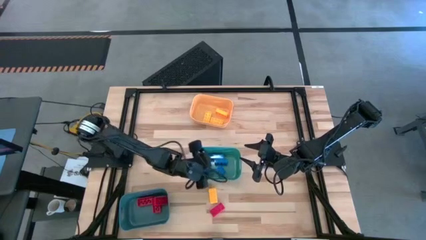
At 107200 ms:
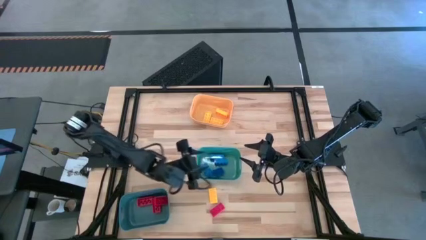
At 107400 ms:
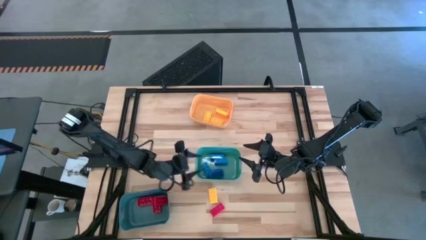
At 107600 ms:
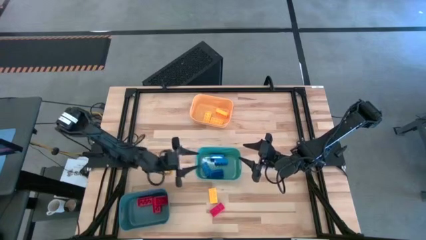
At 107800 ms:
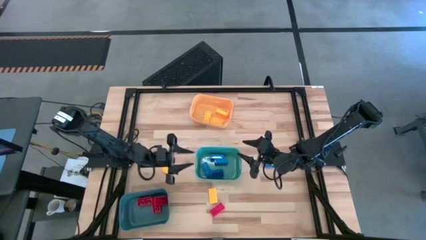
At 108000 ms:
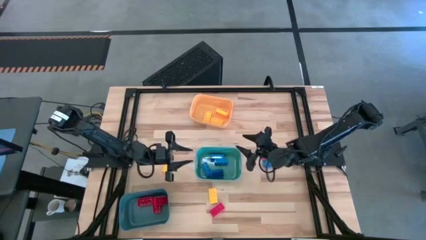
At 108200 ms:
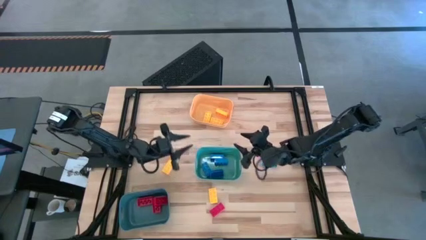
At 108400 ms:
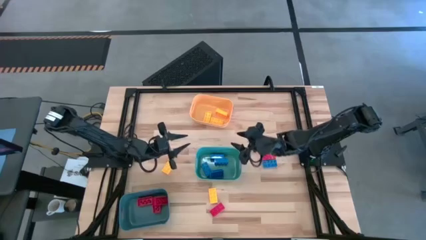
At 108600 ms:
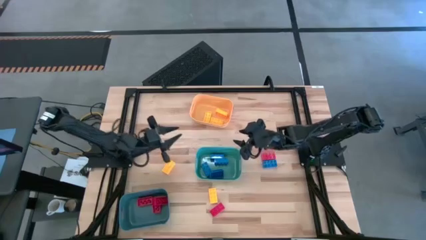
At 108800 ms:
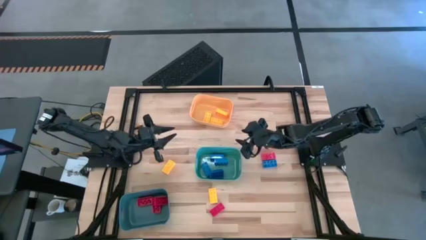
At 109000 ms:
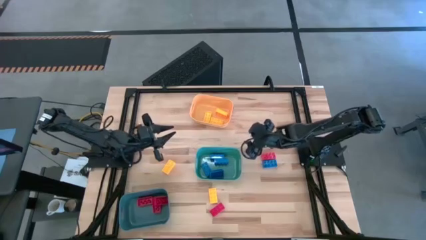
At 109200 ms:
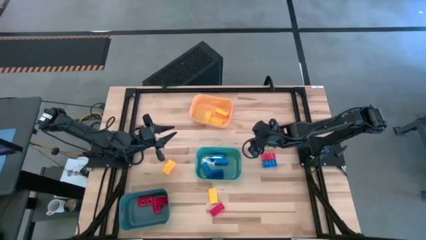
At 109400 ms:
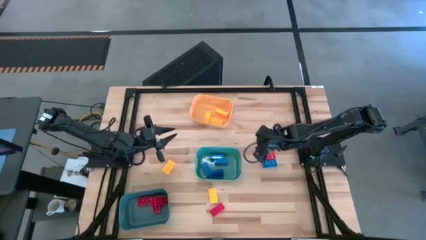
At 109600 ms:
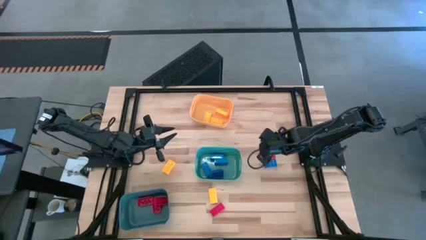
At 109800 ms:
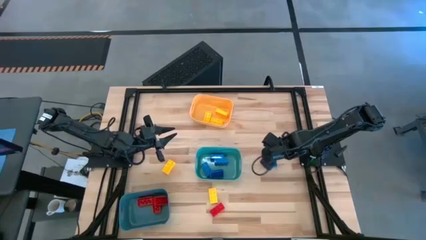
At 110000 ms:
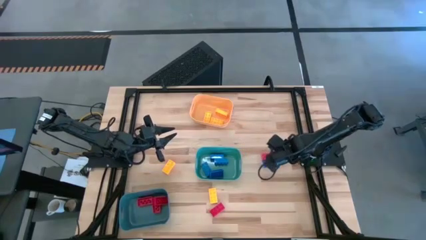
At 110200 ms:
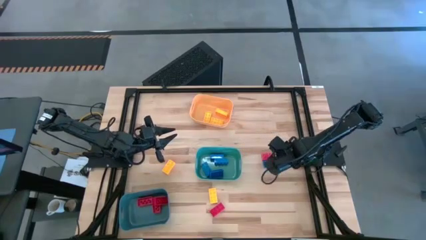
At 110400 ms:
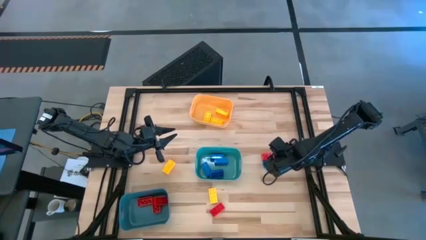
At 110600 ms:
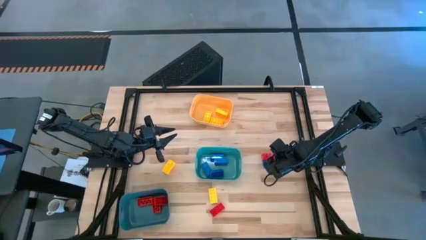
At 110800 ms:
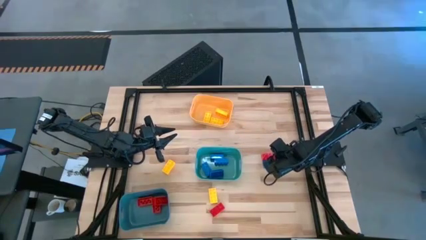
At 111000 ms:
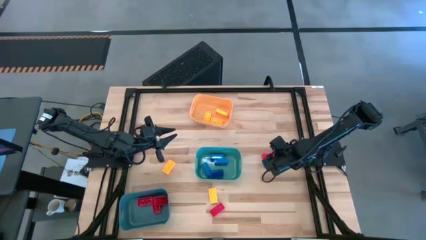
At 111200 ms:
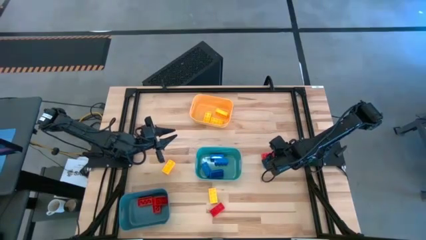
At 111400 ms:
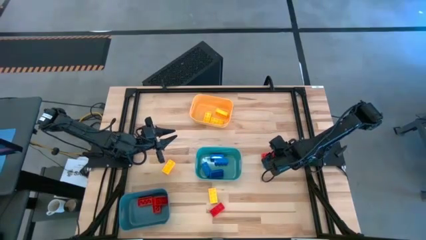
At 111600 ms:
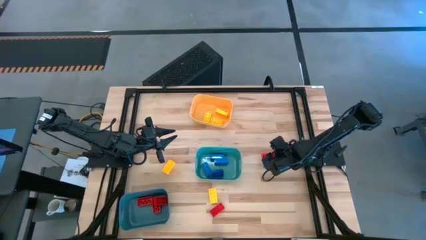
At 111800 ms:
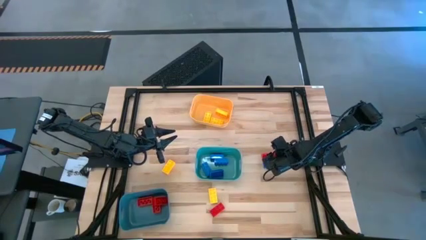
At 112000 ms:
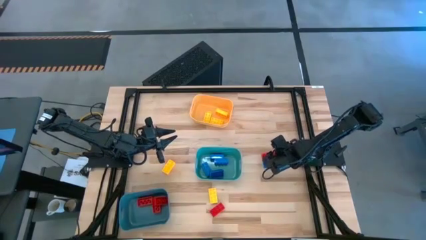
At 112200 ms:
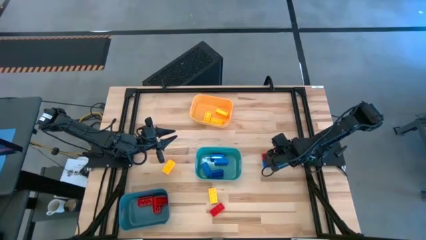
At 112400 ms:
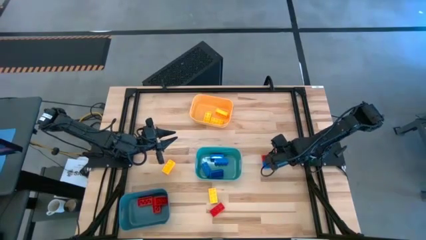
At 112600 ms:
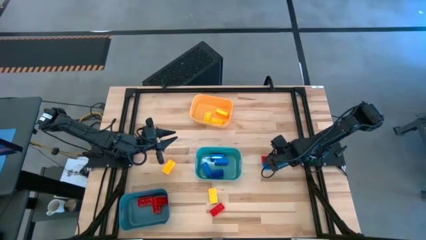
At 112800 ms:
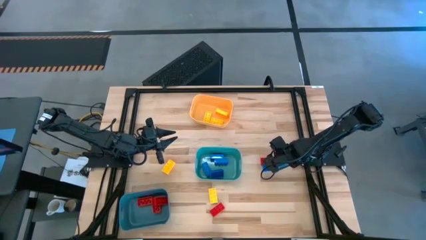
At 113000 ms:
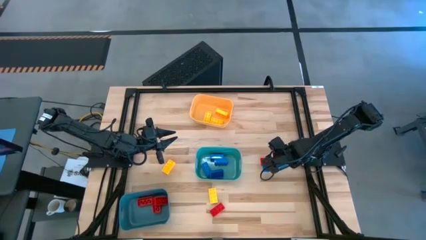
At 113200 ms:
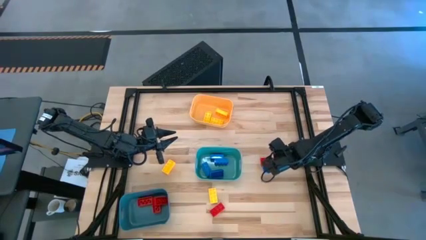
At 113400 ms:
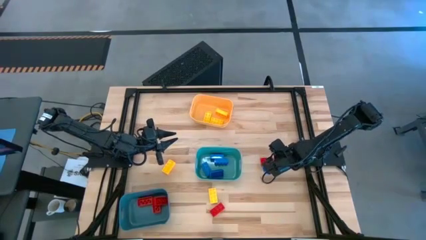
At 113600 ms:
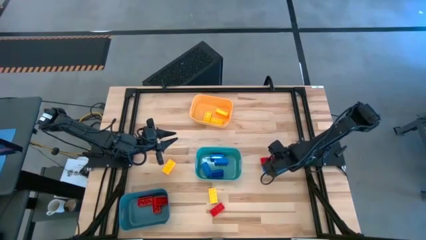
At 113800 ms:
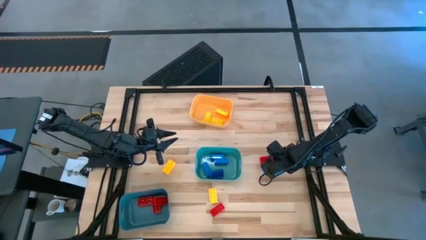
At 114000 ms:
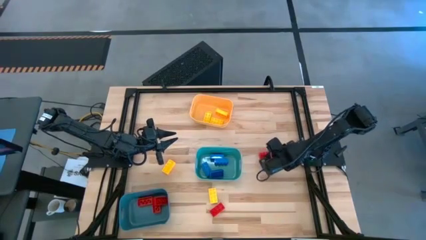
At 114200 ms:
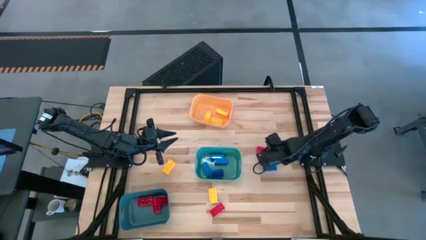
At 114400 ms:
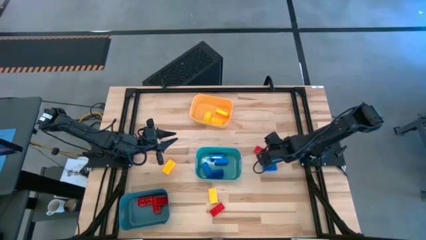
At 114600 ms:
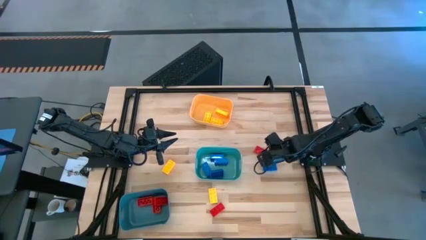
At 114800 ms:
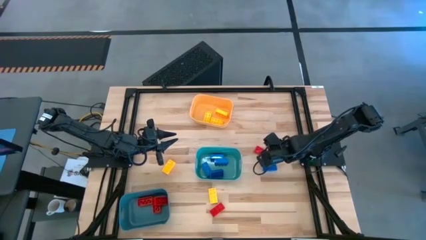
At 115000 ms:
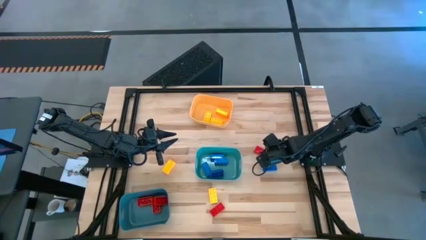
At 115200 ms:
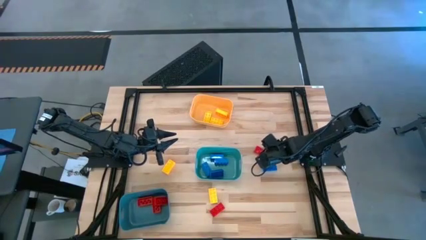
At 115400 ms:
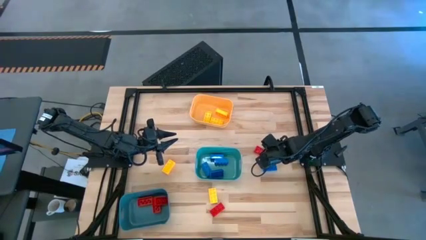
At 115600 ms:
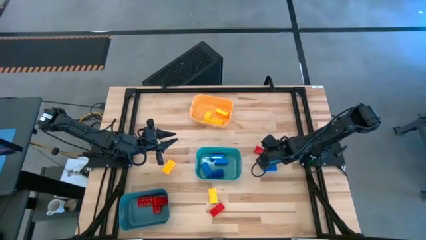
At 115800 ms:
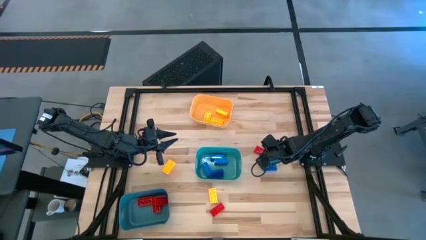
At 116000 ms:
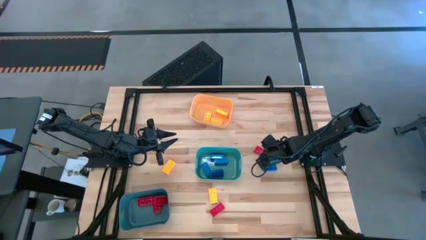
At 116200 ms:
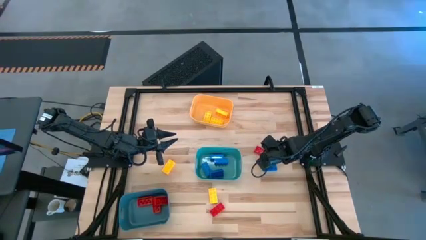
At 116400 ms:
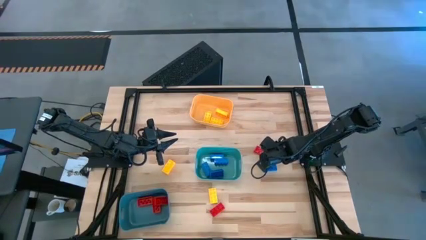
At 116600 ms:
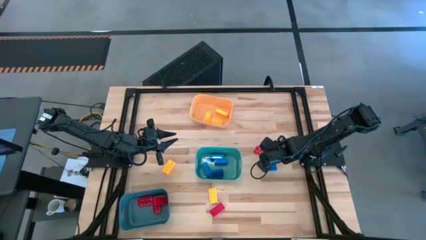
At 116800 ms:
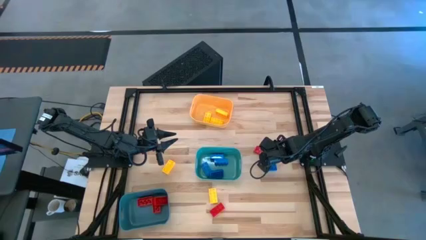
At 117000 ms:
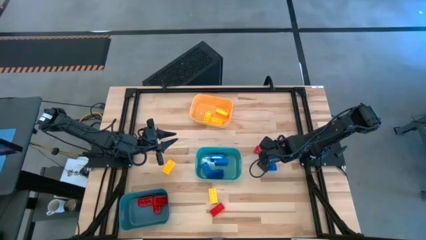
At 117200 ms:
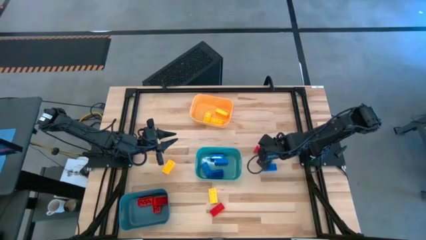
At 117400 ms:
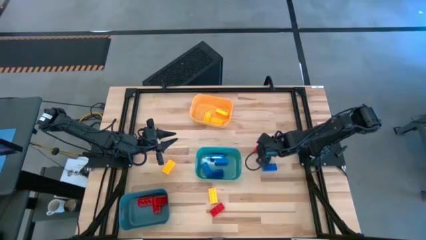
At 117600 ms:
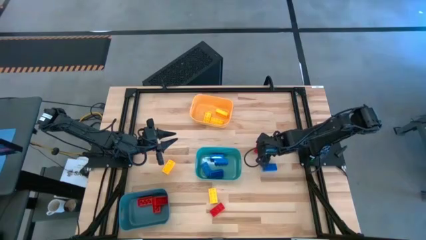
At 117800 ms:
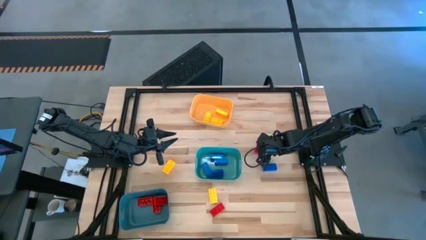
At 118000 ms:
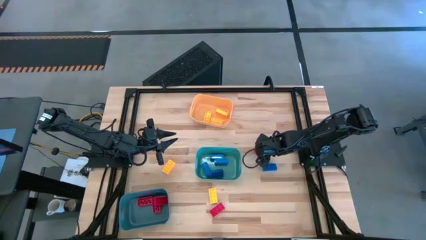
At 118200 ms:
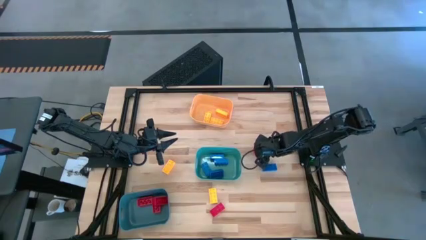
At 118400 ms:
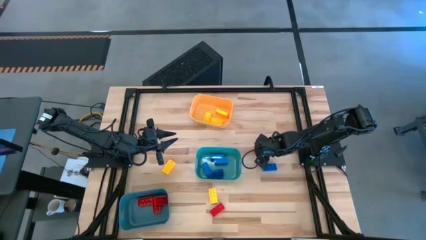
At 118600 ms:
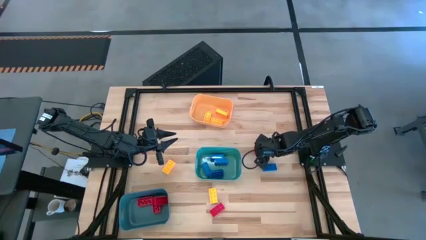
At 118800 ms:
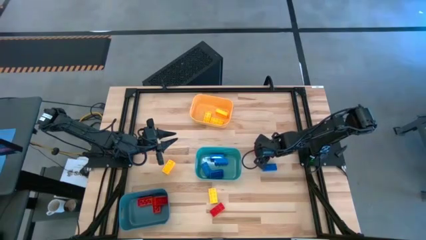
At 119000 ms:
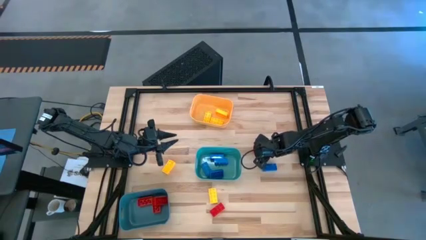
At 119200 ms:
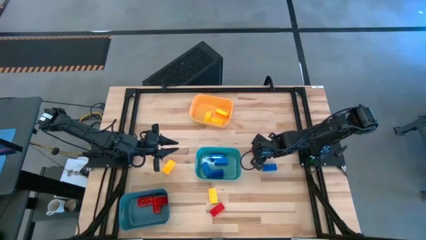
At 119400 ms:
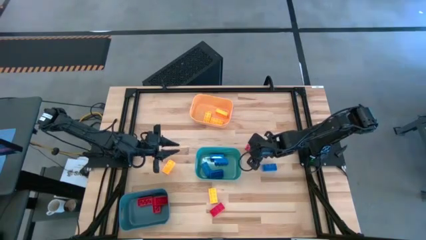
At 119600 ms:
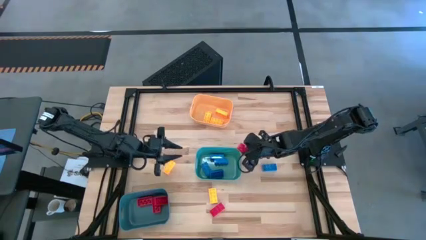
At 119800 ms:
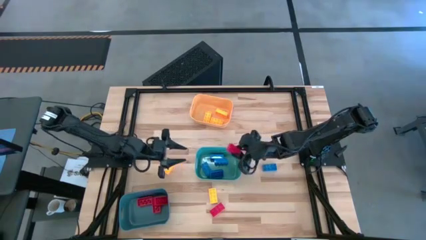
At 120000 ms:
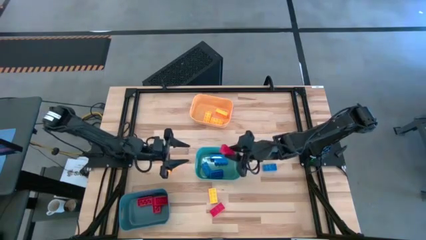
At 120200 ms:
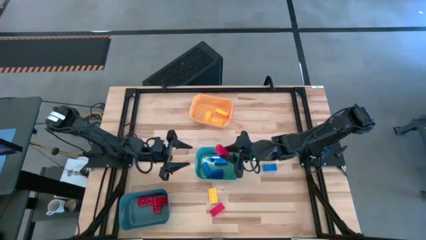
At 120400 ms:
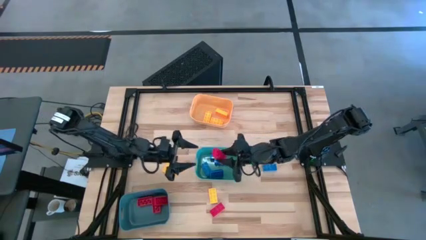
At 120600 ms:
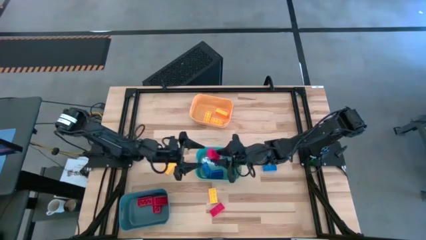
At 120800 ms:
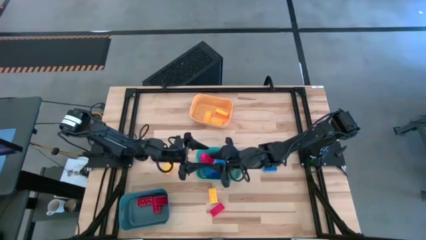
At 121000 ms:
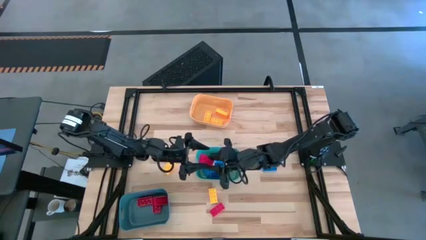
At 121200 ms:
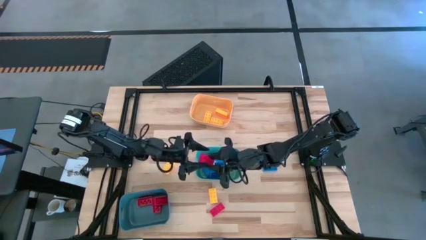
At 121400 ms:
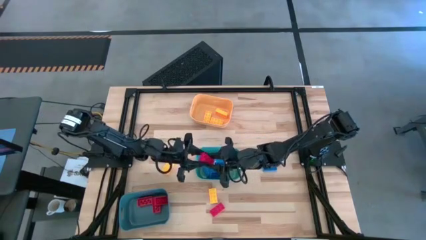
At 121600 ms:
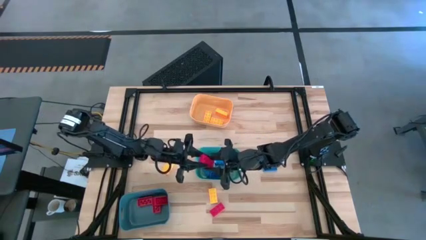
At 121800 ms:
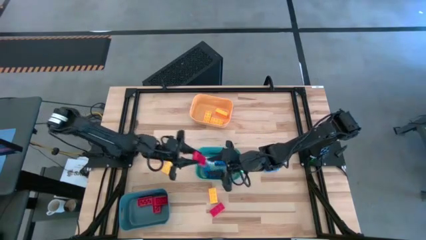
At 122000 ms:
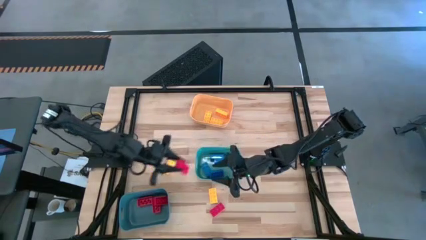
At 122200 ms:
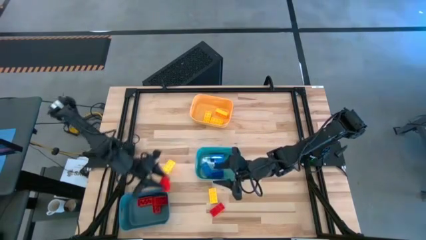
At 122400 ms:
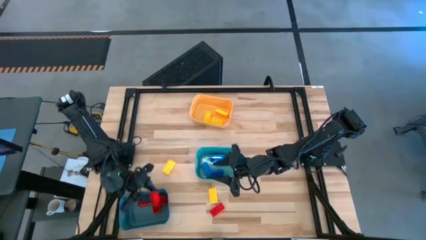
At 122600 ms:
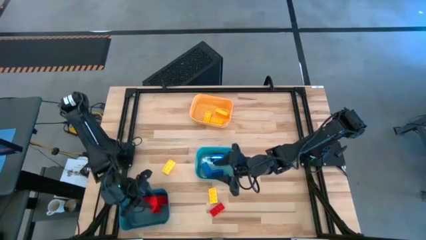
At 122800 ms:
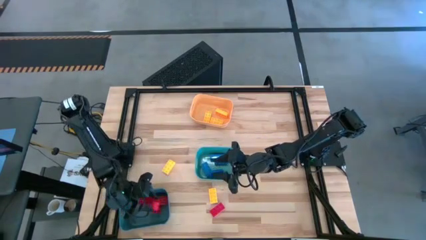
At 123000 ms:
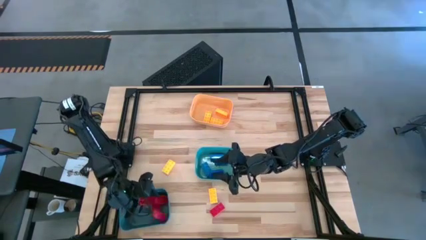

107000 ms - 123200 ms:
Task: Sort & place blocks by color
Put the red game piece into the blue bin
